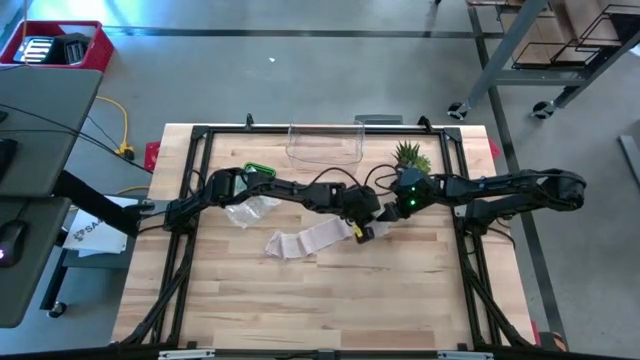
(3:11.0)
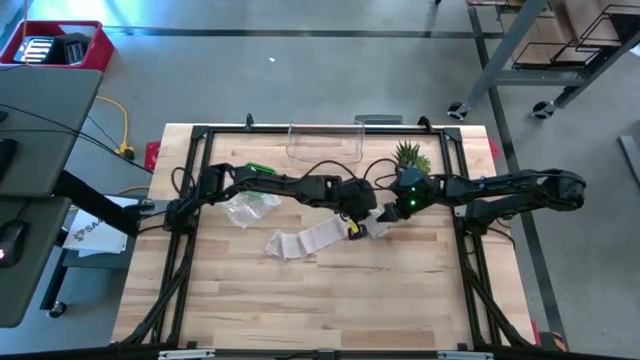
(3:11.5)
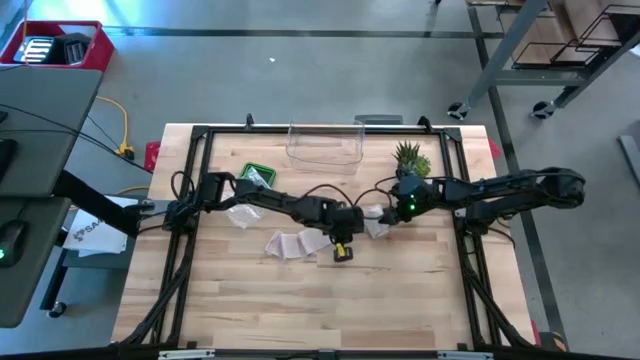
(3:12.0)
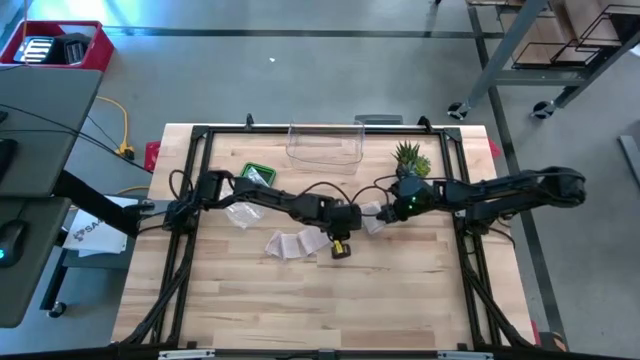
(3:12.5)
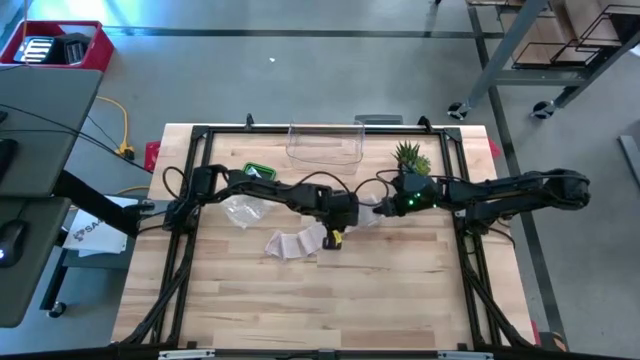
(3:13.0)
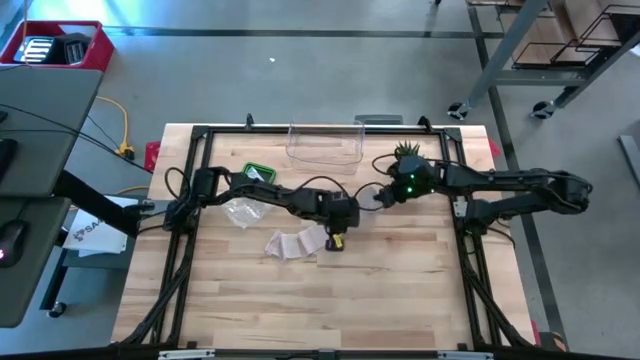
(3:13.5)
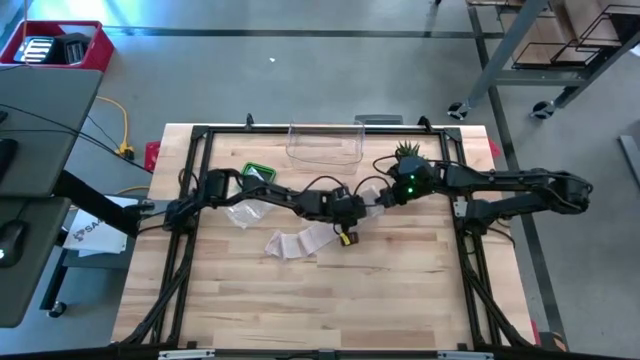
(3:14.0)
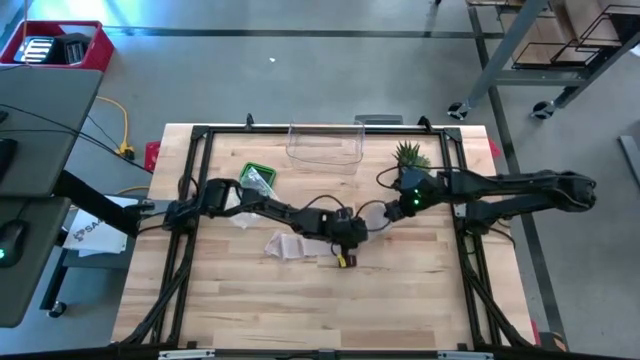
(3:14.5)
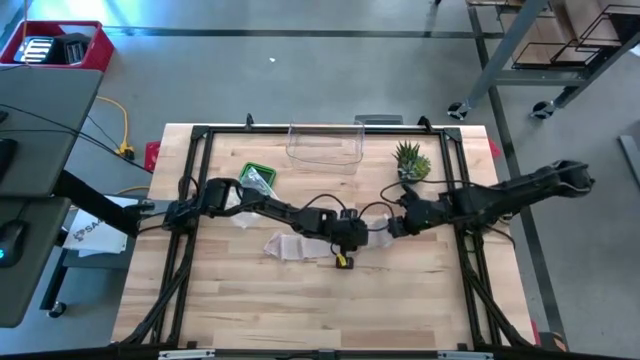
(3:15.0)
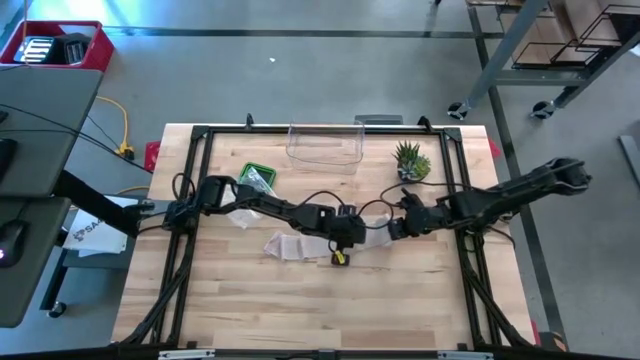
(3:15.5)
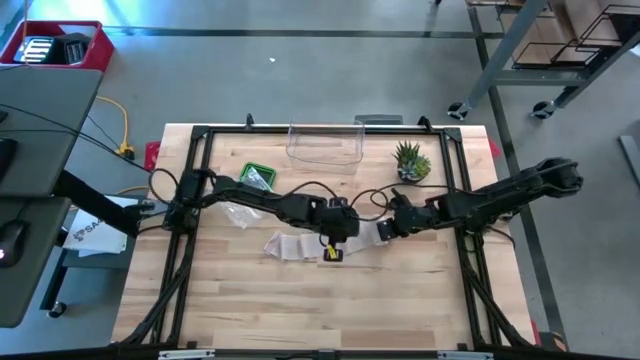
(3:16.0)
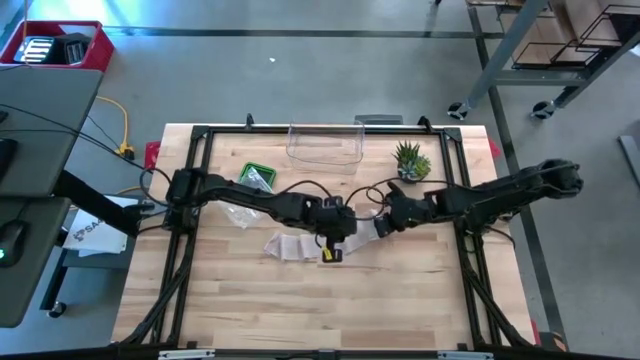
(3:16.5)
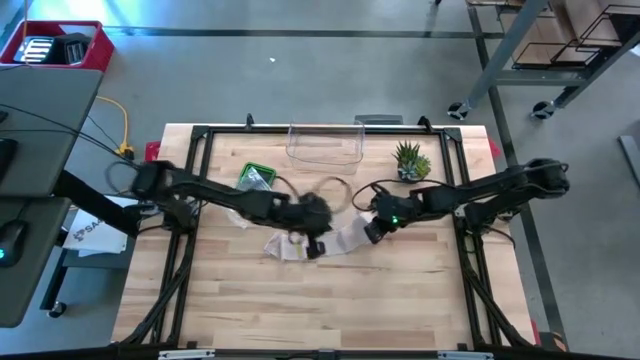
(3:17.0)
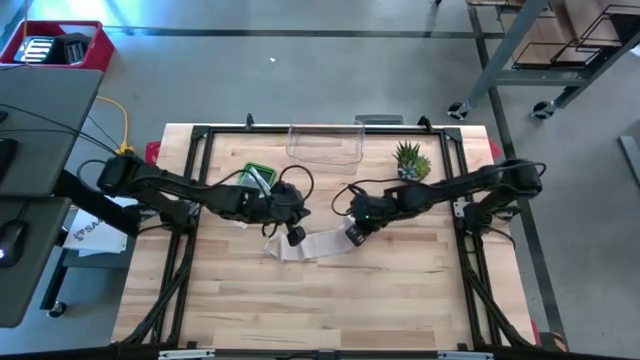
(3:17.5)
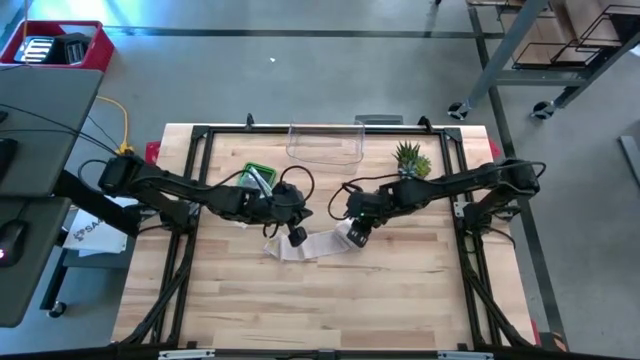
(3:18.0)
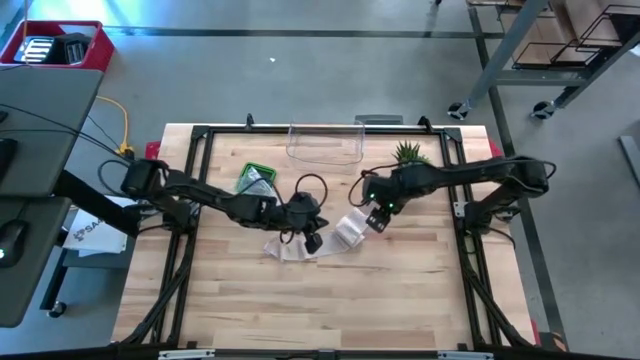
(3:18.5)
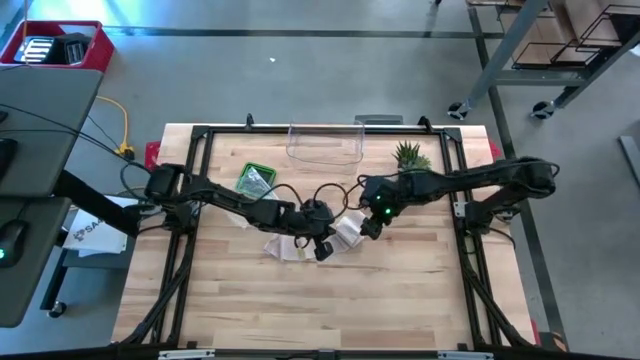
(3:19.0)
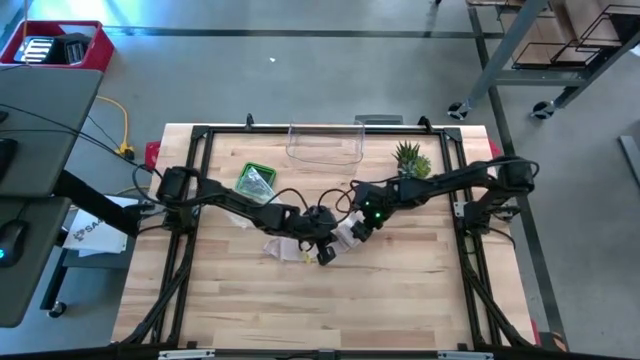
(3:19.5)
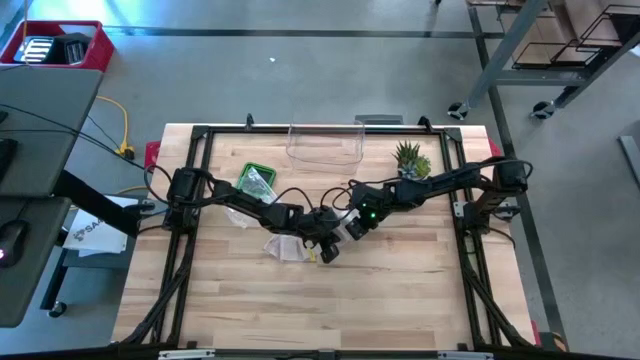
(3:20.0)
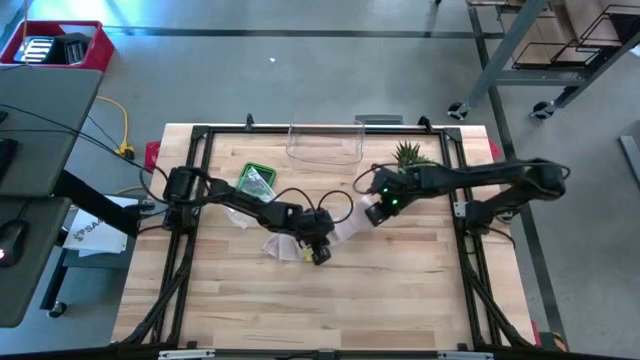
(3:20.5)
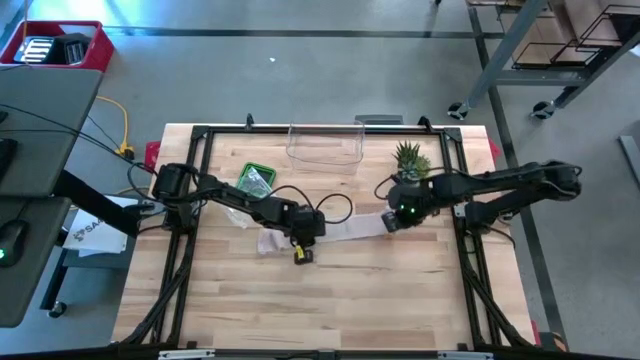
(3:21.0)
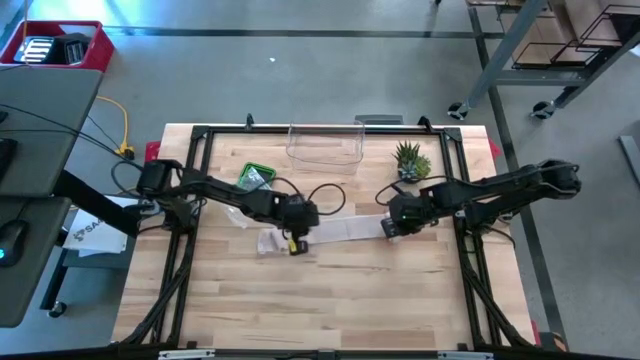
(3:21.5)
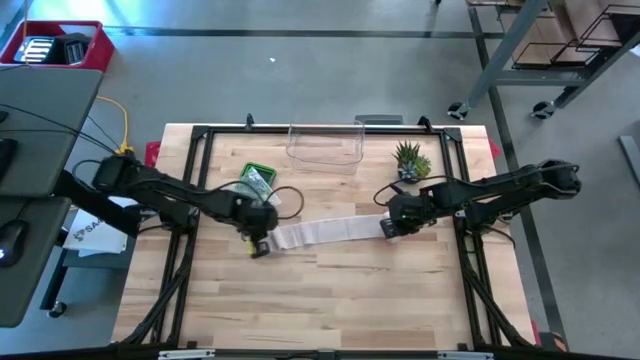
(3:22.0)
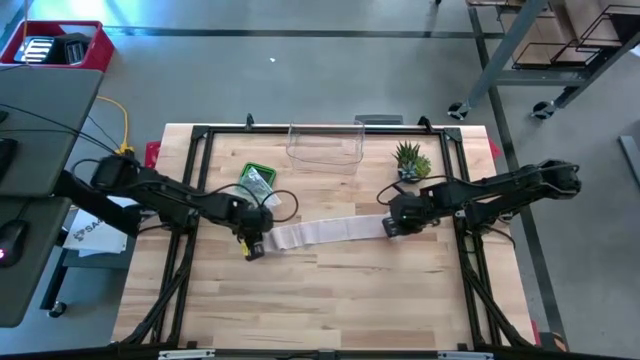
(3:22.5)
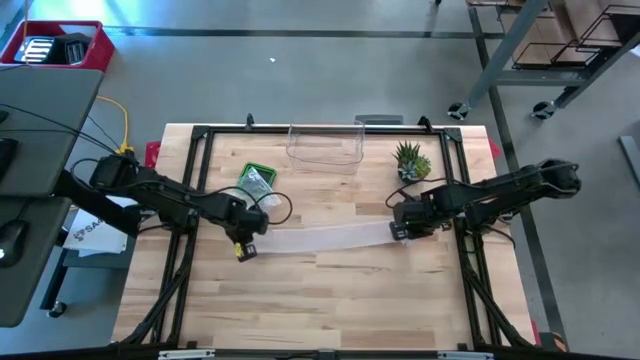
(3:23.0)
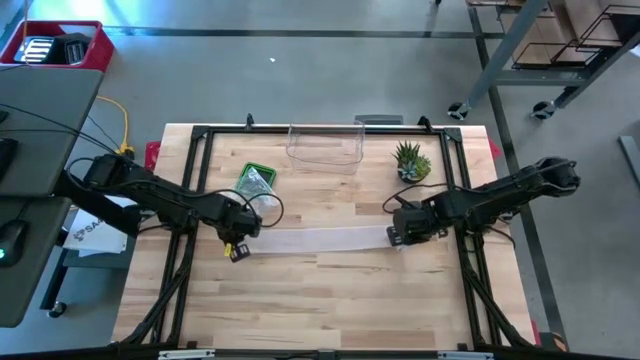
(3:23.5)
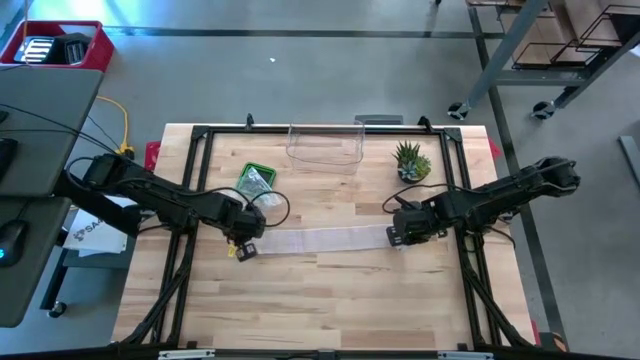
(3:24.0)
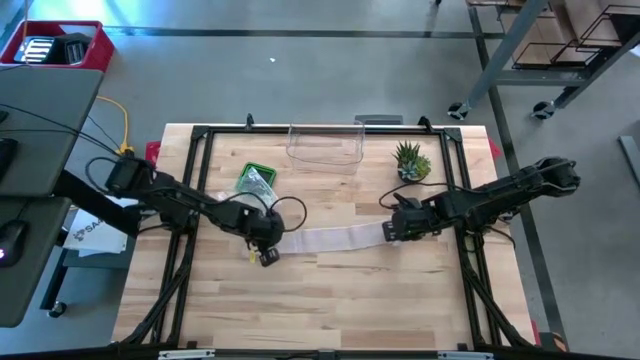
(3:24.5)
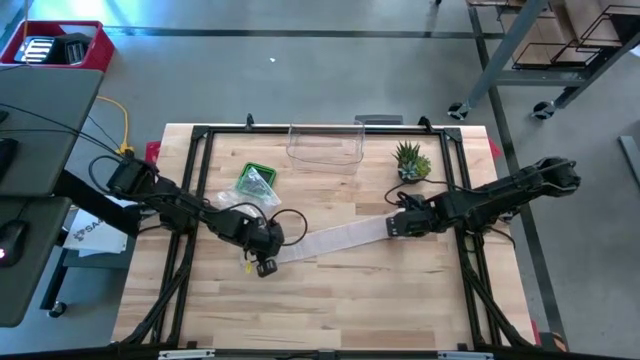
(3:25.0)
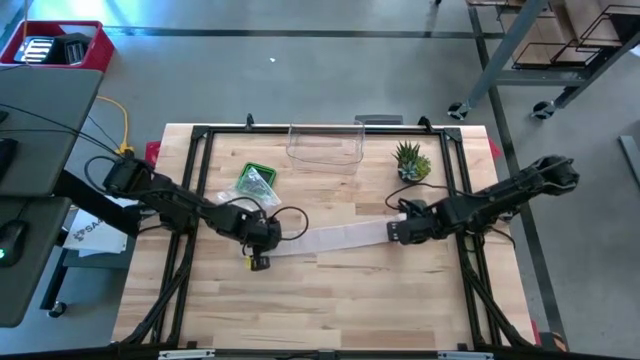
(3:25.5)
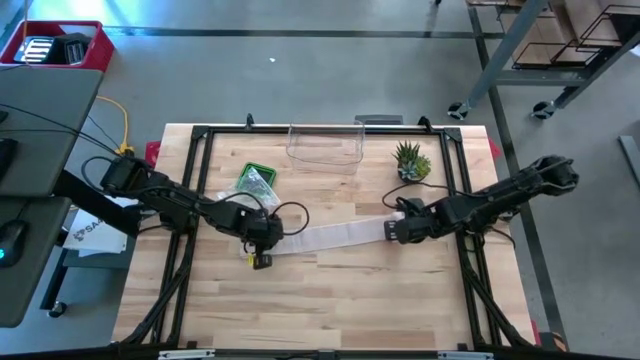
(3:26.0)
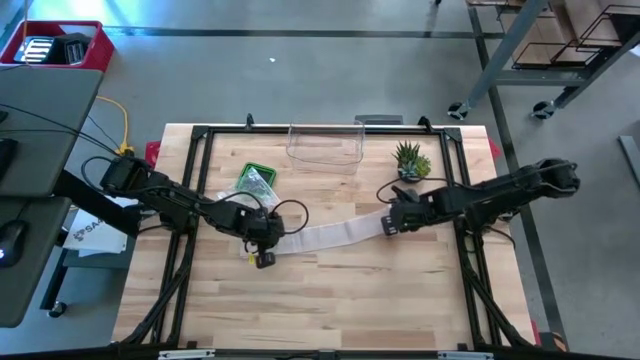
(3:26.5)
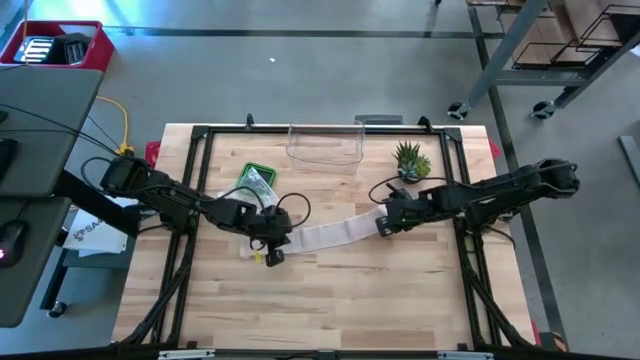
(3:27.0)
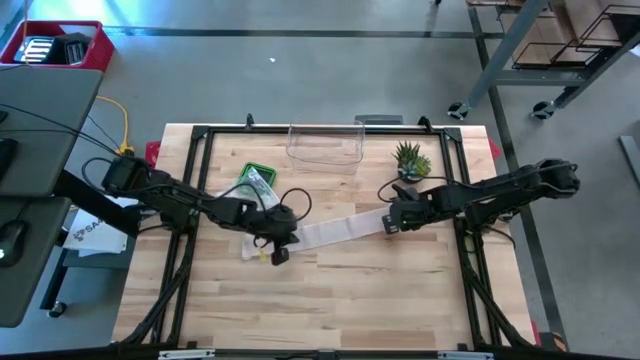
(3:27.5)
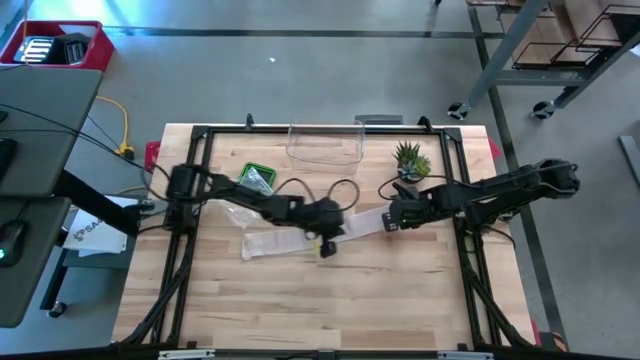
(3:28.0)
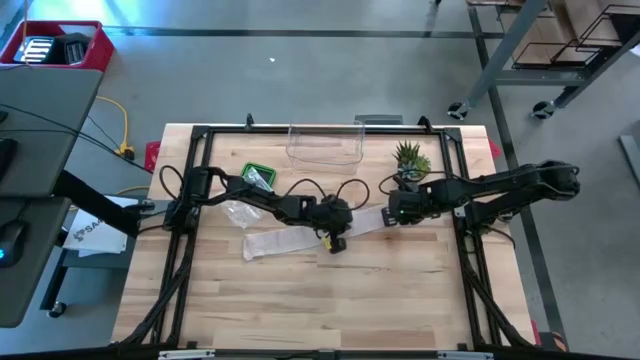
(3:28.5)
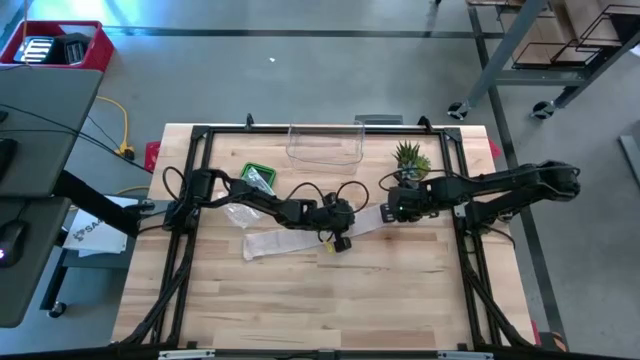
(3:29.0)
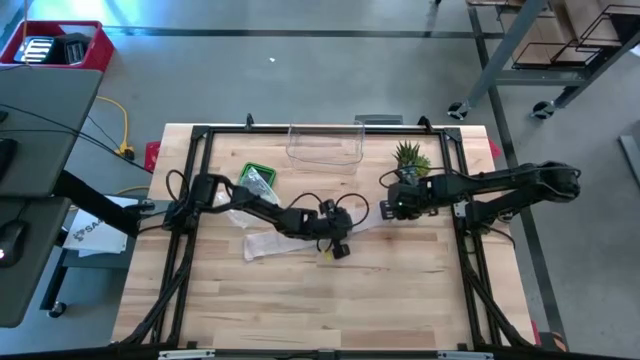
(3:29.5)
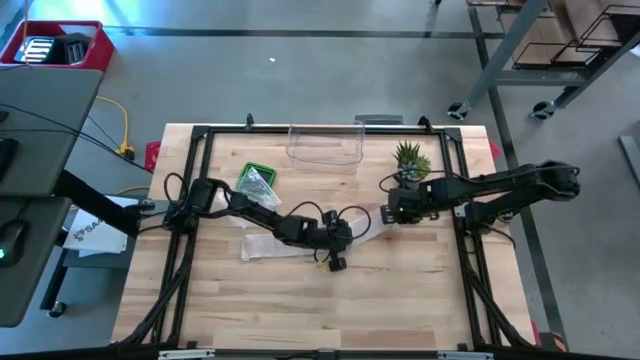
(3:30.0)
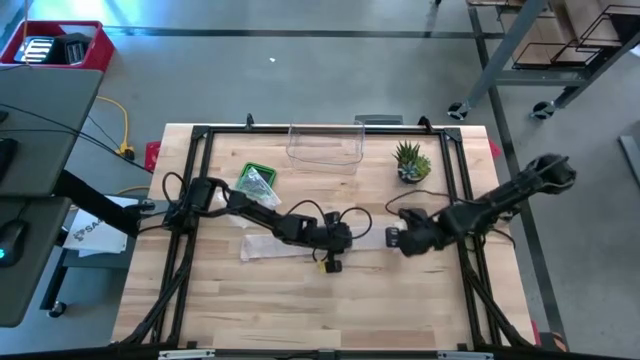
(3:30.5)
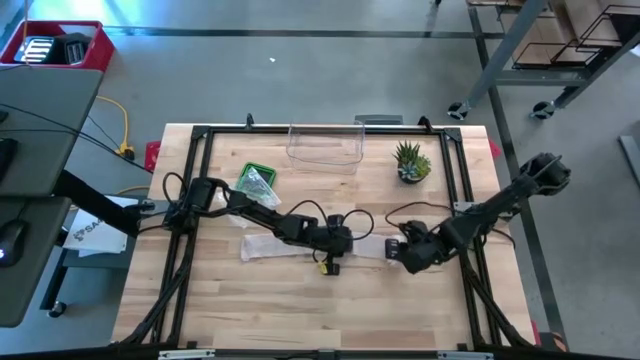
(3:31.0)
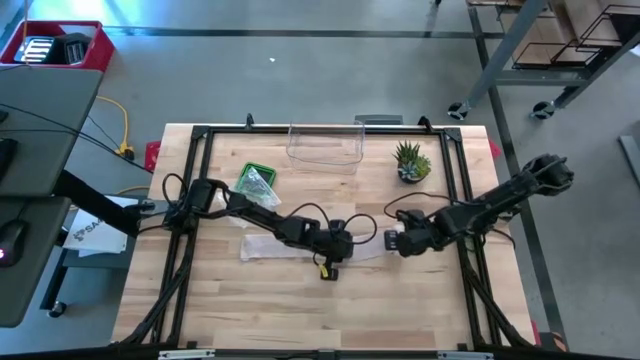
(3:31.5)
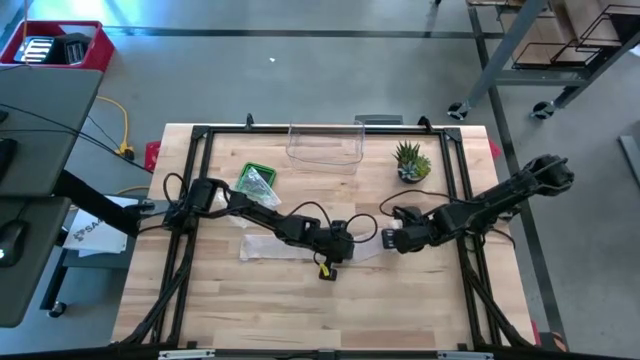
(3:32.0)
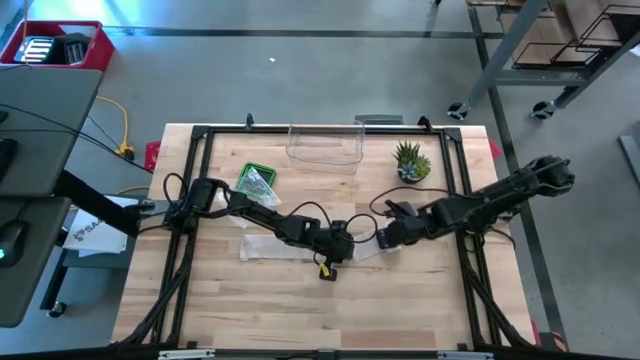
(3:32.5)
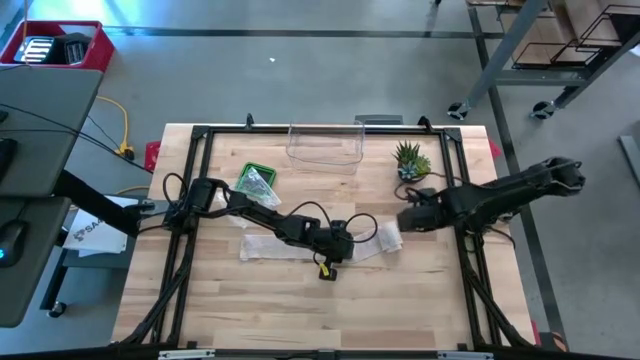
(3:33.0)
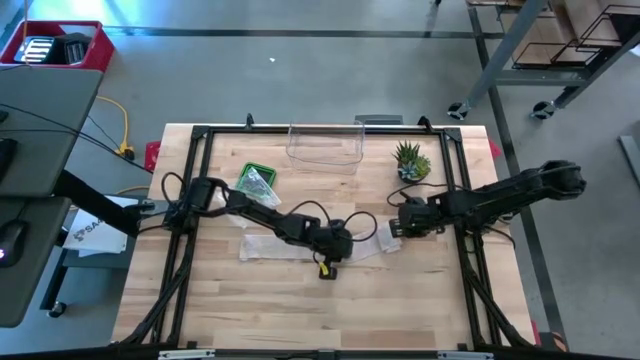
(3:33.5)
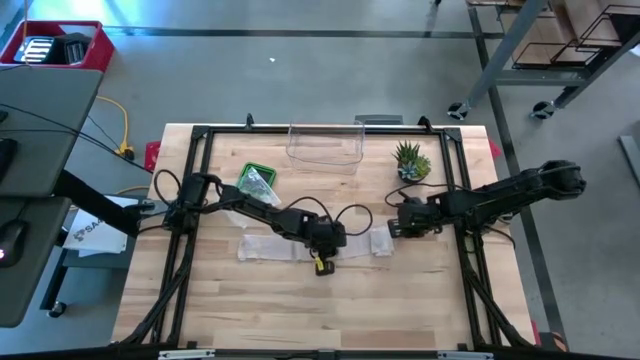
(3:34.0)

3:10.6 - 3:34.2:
Task: Roll bandage
Roll the bandage
